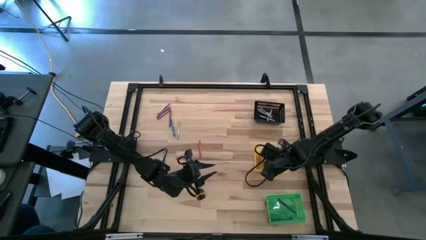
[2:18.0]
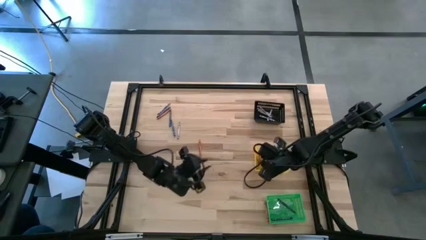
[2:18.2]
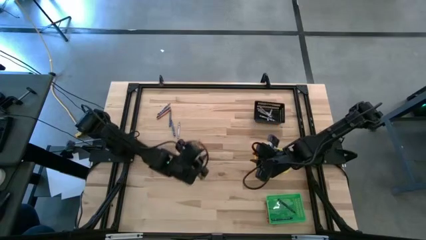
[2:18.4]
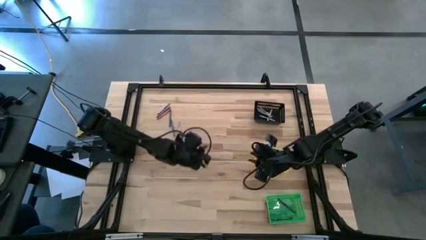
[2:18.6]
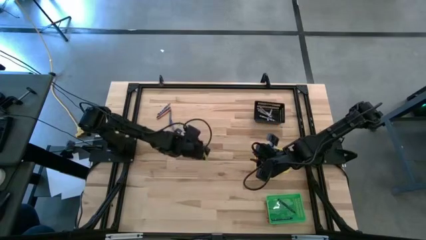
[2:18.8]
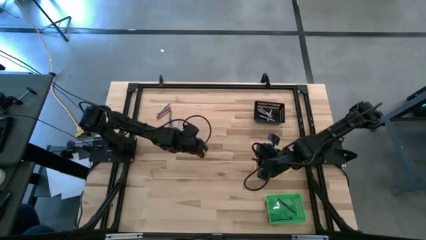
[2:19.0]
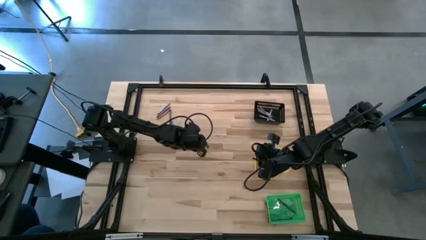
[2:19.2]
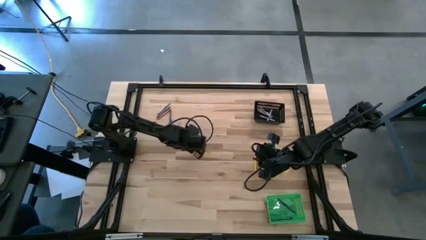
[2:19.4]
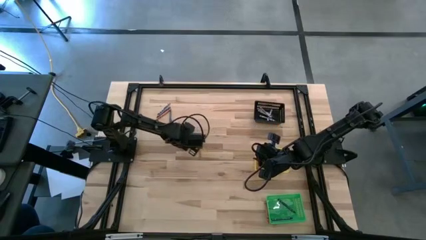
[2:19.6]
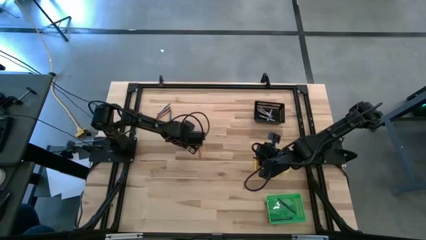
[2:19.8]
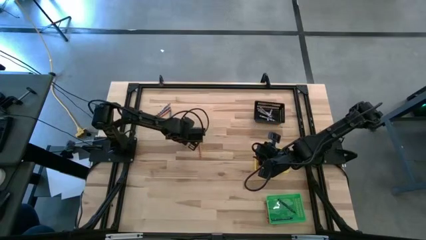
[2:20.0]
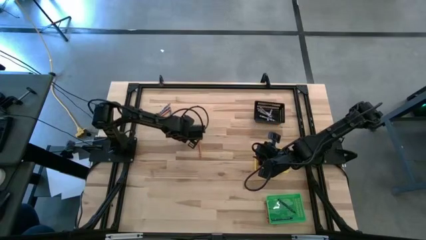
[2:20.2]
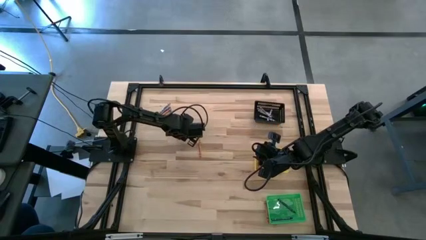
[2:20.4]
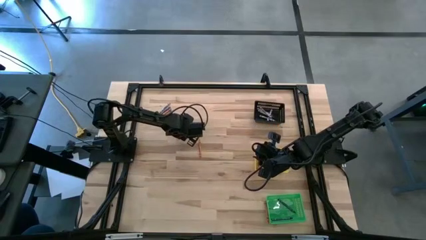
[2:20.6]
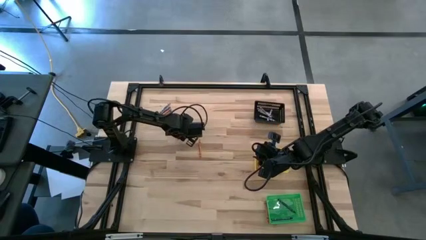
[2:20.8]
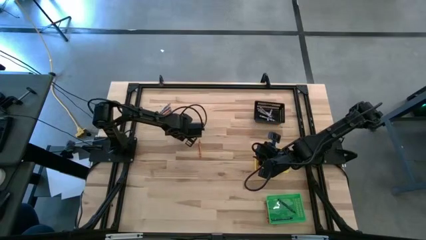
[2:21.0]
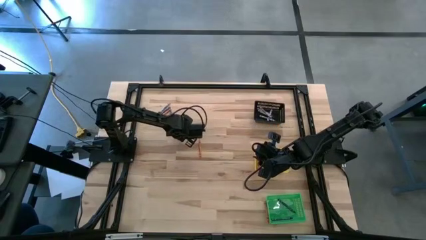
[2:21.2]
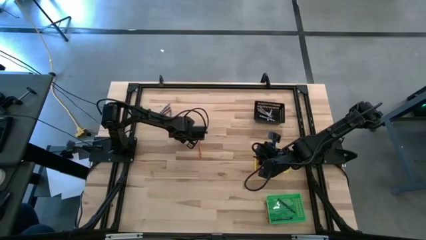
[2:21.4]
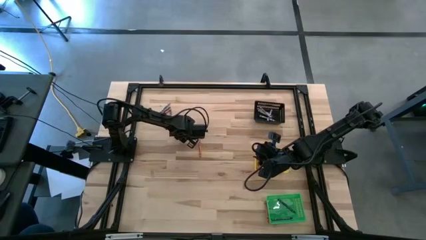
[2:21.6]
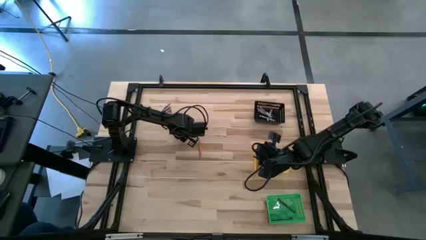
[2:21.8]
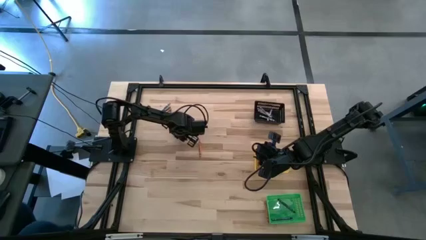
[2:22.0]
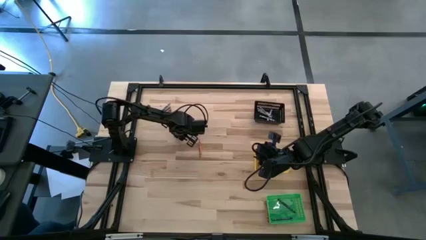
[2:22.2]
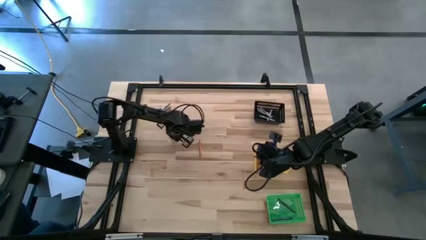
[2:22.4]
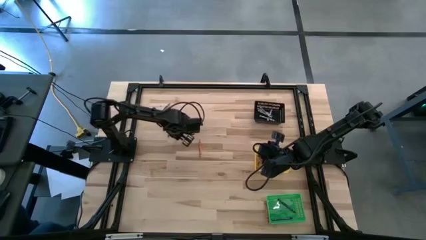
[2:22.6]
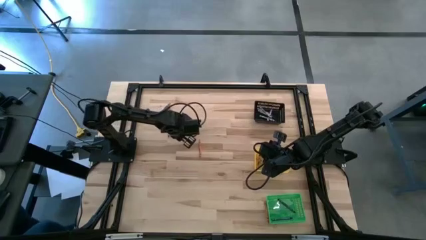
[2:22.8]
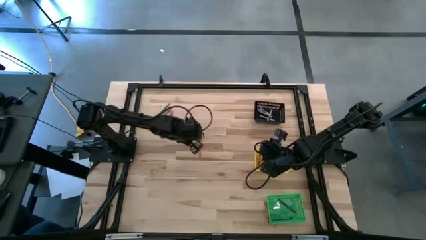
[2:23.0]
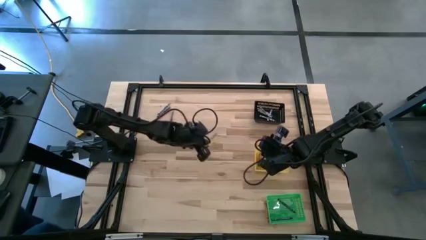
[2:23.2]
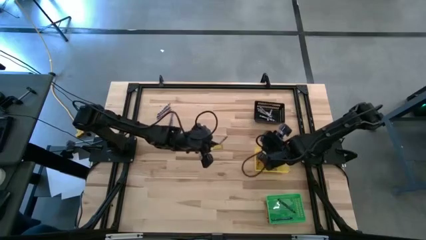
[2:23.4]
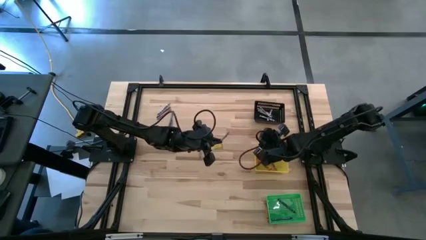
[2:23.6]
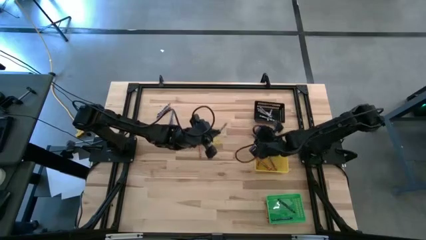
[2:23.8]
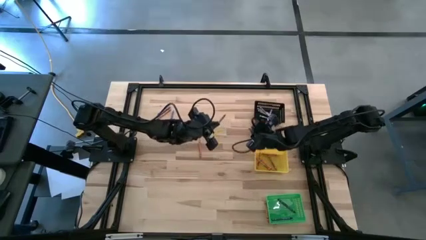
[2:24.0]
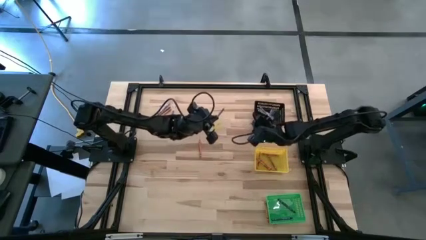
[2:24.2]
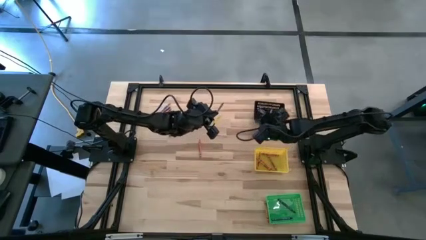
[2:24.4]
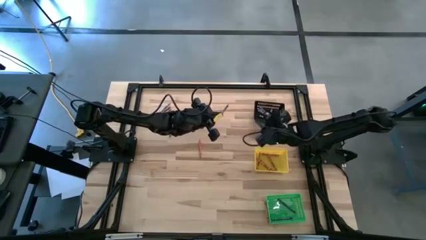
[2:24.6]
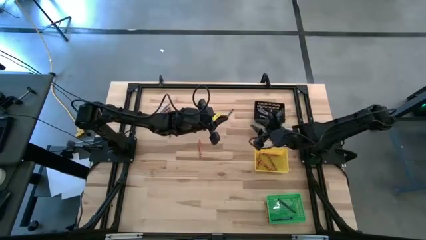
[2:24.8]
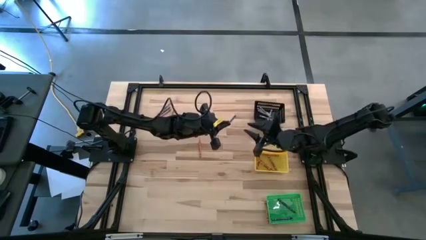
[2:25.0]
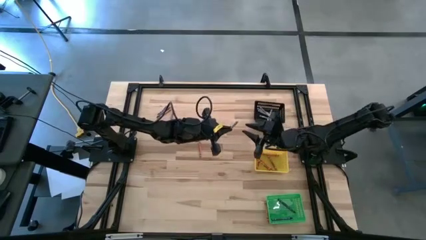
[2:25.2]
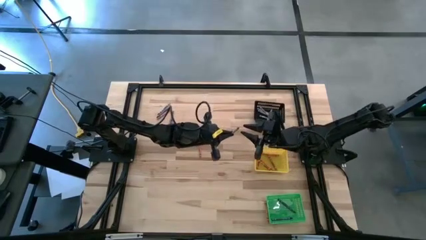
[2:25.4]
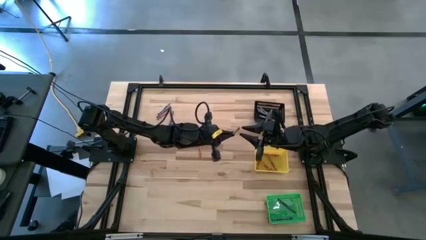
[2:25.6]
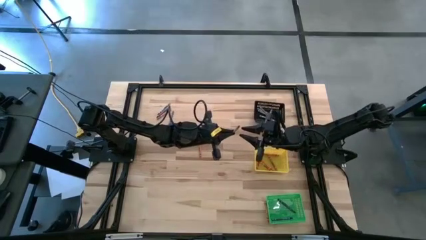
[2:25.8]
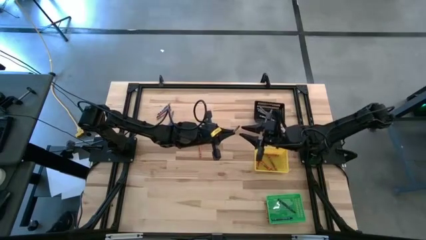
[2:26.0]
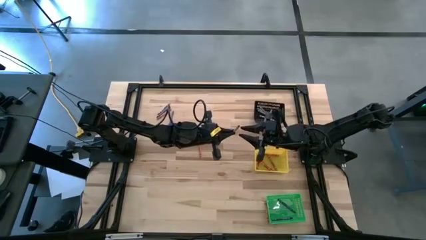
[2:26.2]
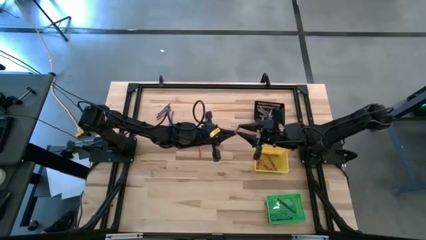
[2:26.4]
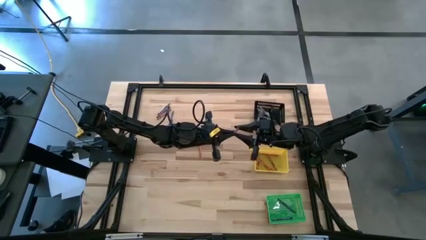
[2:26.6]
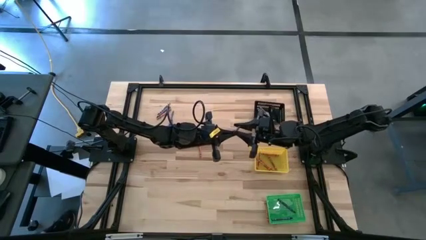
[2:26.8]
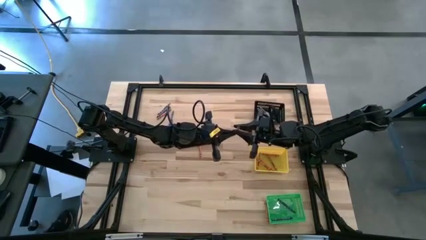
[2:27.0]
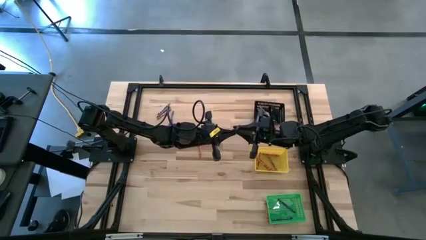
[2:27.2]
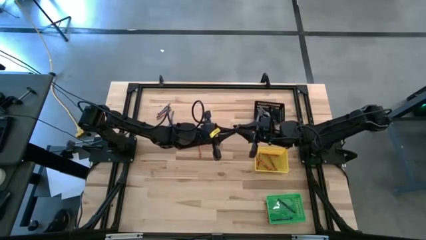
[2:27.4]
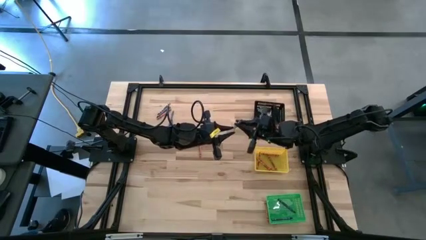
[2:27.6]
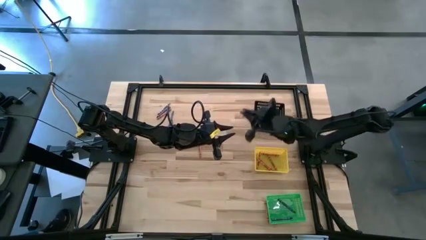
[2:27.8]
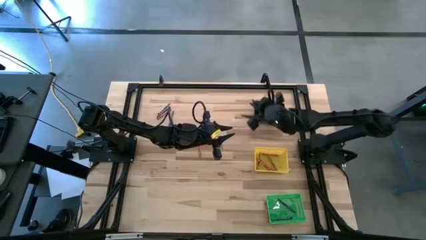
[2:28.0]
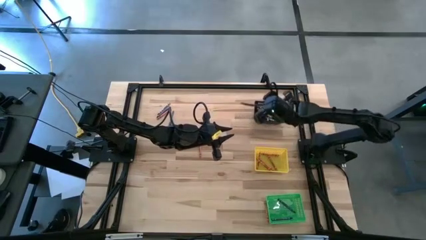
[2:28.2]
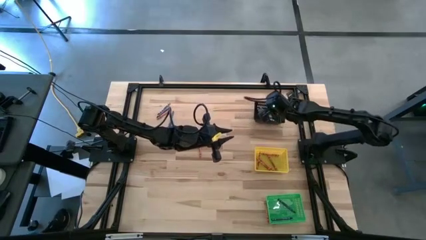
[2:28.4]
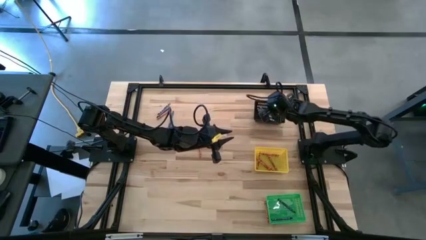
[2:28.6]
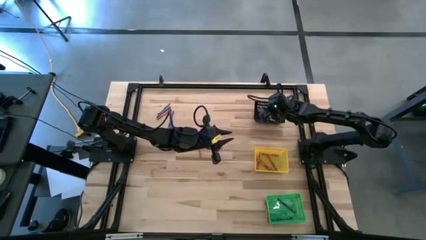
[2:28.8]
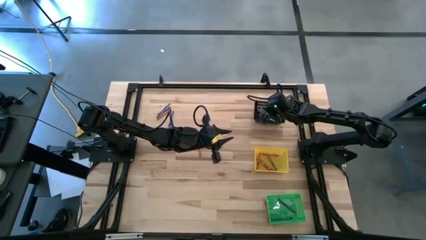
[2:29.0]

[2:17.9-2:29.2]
Task: Sort crayons
Put the gray crayon into the black basket

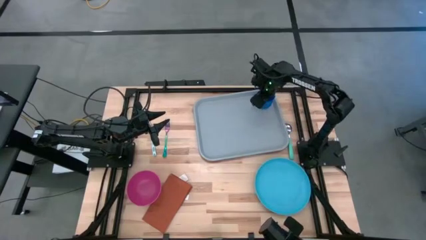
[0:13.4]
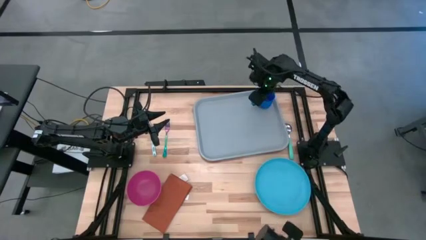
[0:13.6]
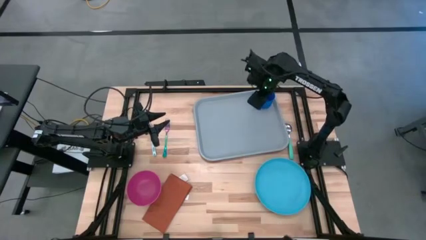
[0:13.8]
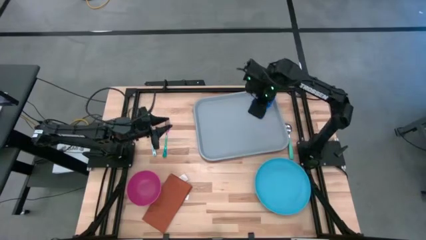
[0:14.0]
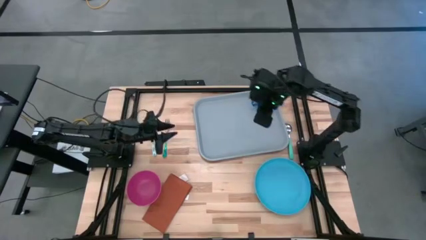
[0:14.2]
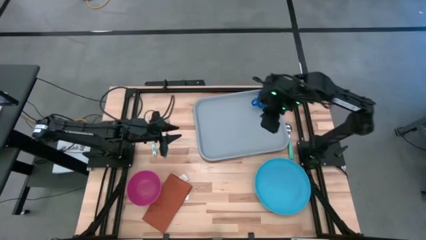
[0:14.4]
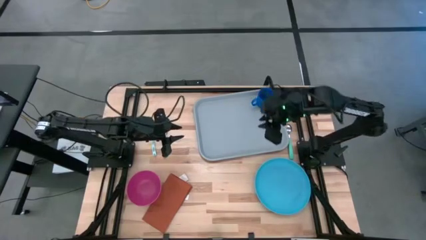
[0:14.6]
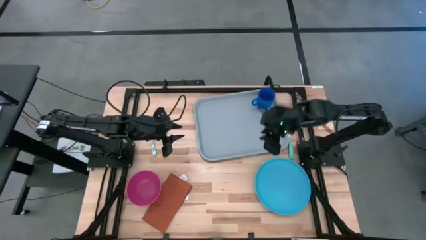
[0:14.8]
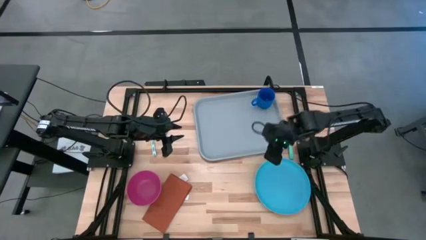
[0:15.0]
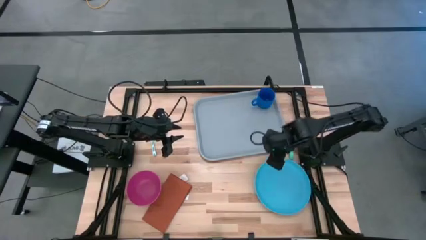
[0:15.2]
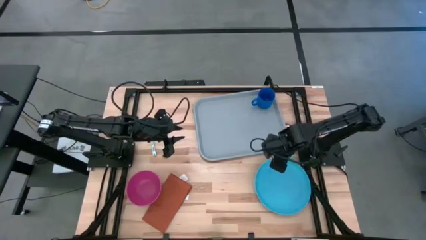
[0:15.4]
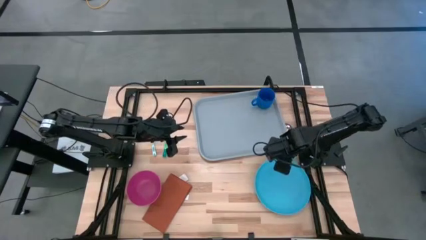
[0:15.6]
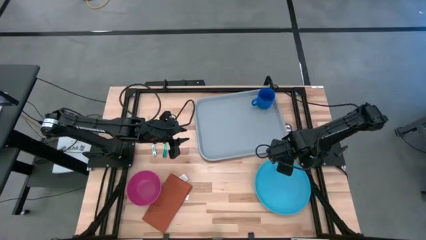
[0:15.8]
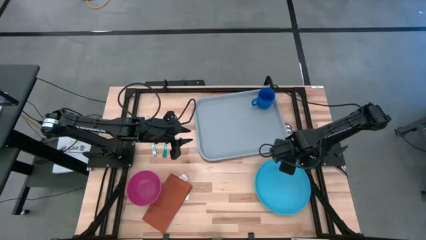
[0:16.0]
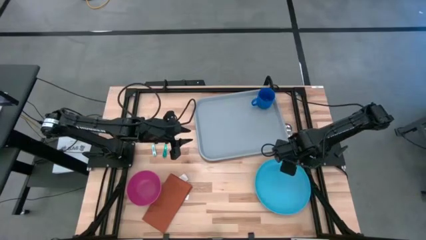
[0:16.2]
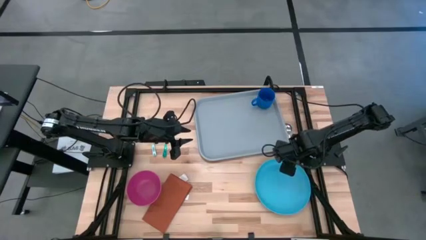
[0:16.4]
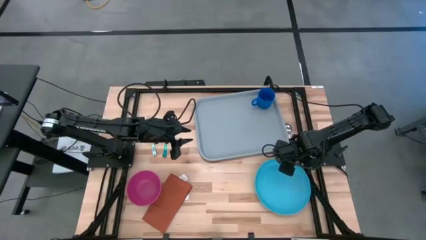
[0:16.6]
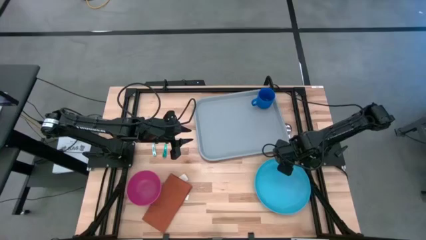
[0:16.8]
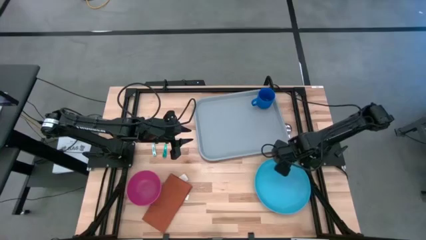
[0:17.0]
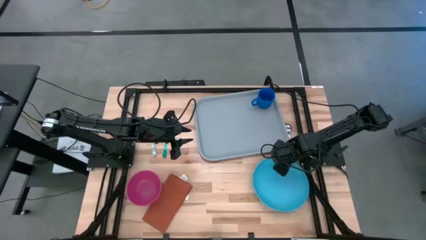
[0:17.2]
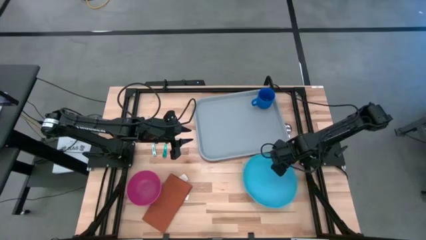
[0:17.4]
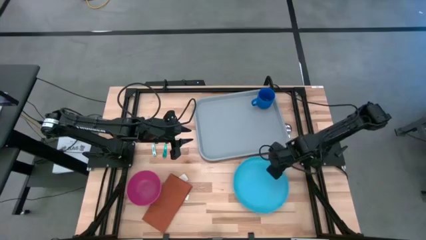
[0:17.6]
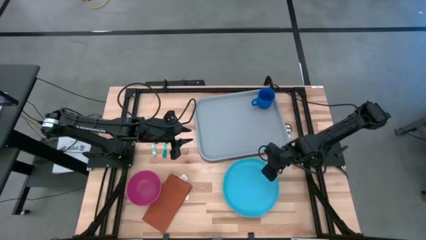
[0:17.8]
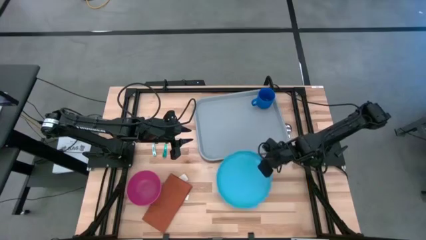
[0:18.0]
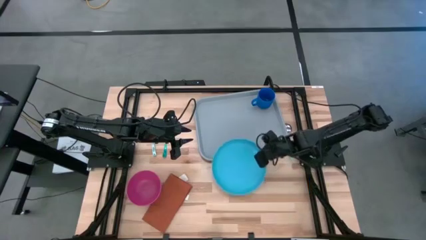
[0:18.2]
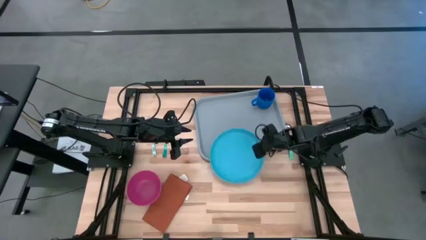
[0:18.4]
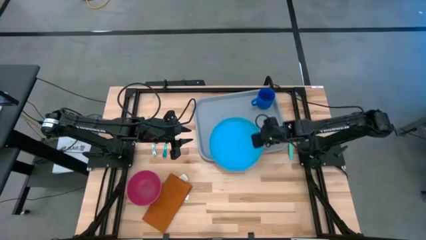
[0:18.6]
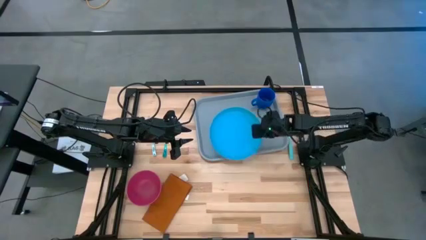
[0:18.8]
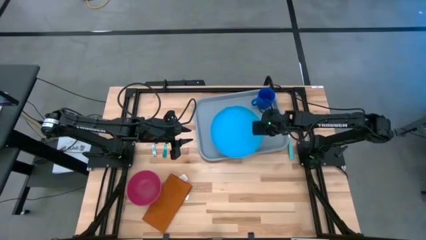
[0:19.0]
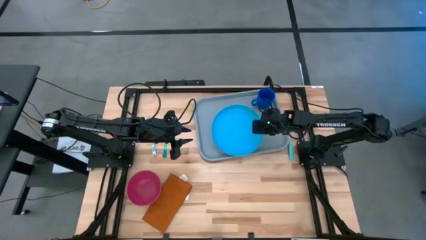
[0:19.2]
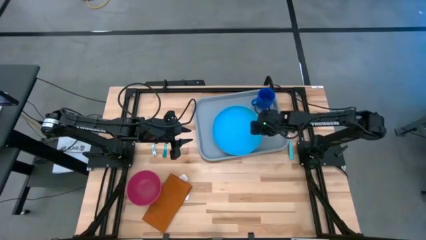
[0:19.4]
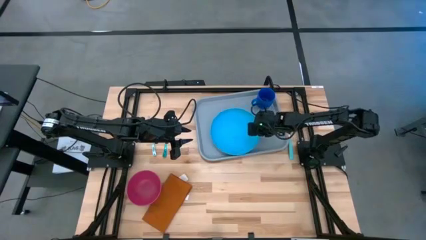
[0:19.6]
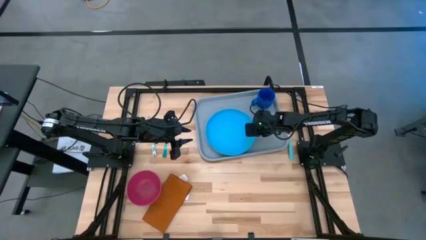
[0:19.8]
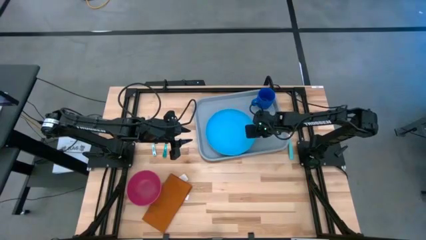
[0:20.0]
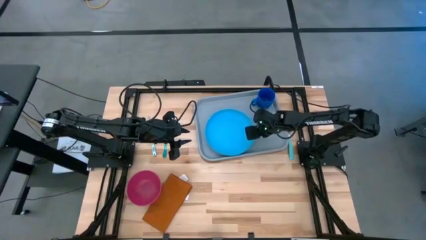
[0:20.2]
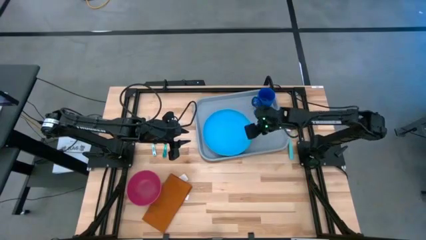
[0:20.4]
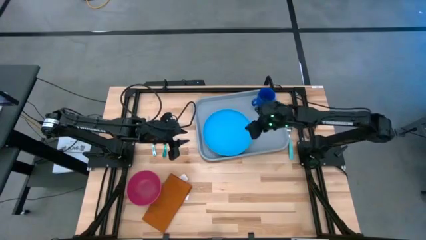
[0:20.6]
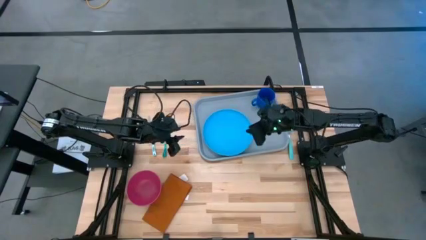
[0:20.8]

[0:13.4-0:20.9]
Task: Set up tray
Put the blue plate to the bottom of the the blue cup on the gray serving tray
